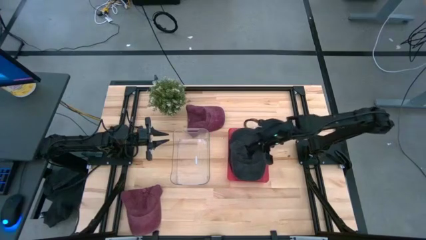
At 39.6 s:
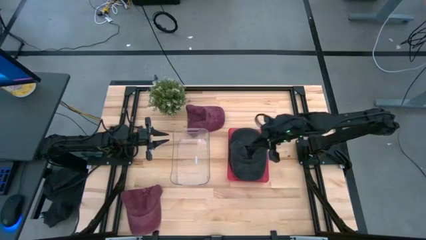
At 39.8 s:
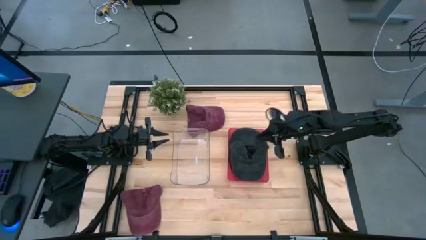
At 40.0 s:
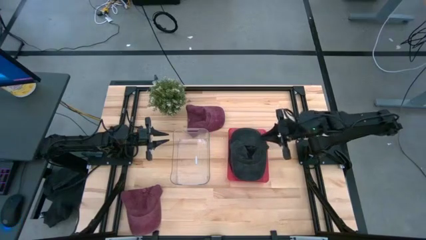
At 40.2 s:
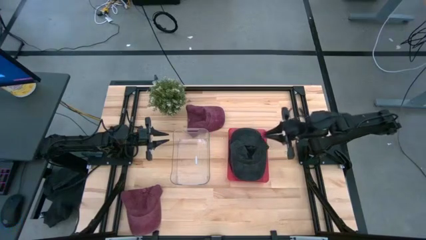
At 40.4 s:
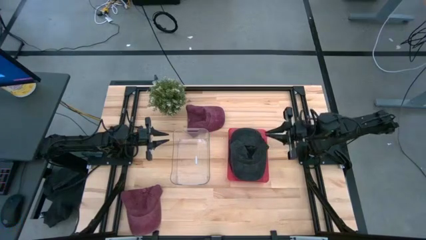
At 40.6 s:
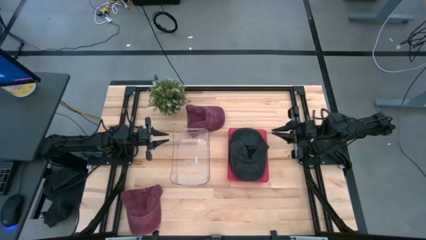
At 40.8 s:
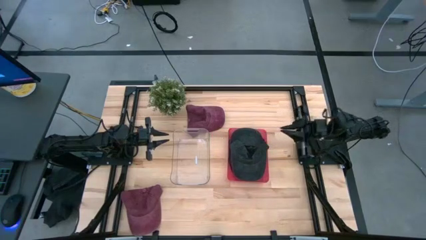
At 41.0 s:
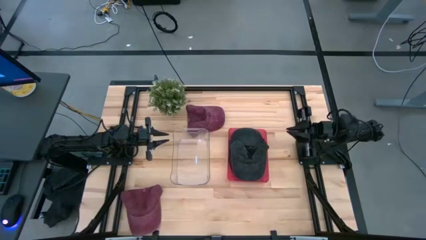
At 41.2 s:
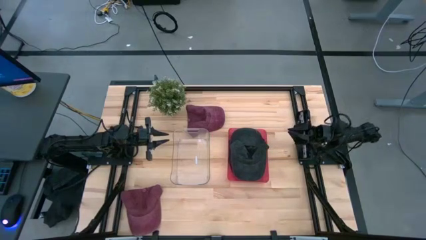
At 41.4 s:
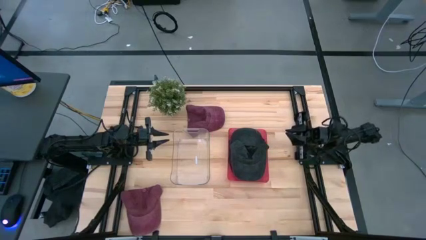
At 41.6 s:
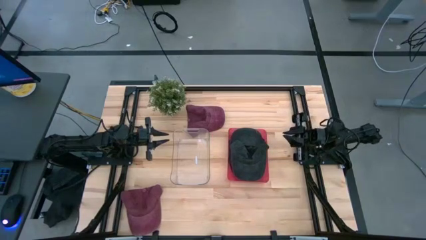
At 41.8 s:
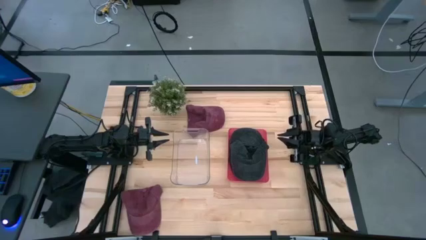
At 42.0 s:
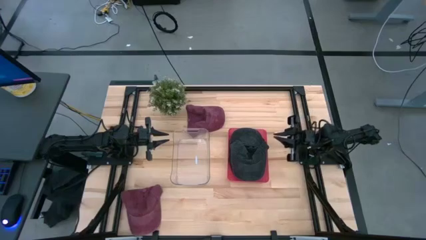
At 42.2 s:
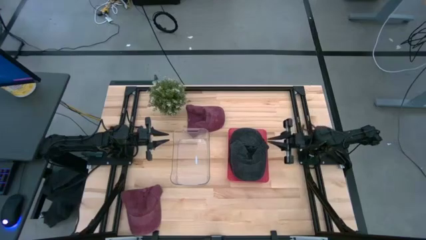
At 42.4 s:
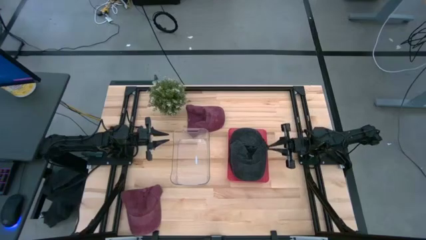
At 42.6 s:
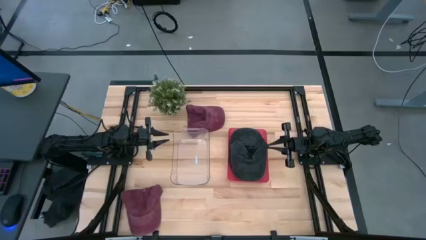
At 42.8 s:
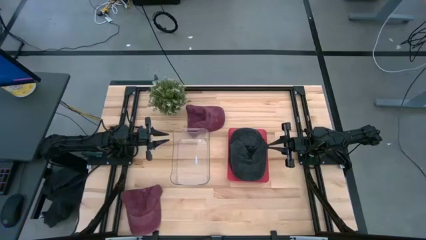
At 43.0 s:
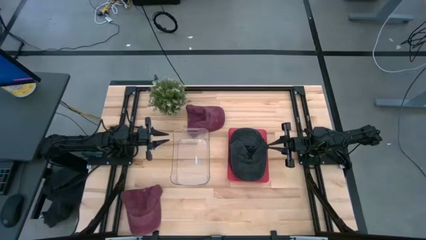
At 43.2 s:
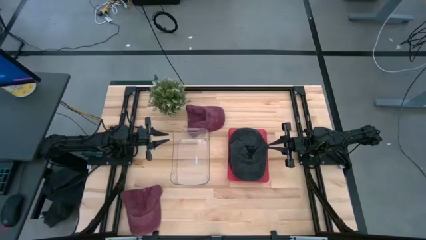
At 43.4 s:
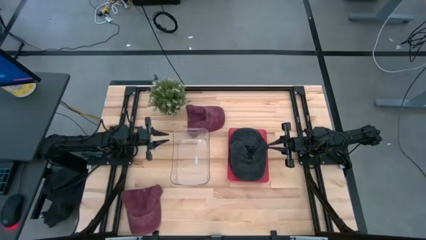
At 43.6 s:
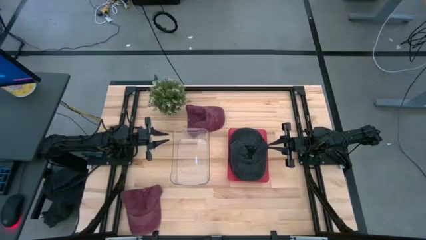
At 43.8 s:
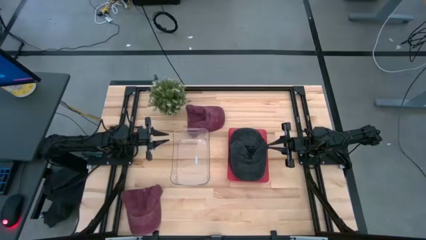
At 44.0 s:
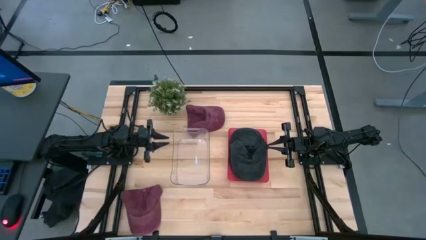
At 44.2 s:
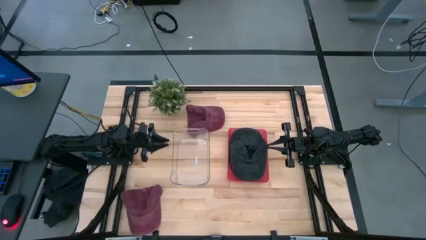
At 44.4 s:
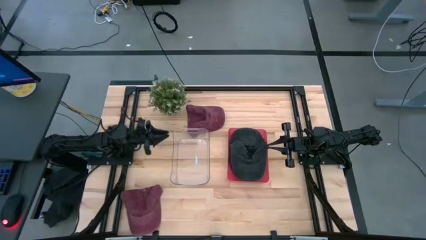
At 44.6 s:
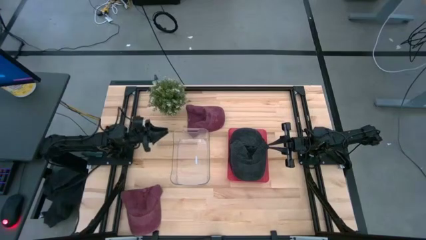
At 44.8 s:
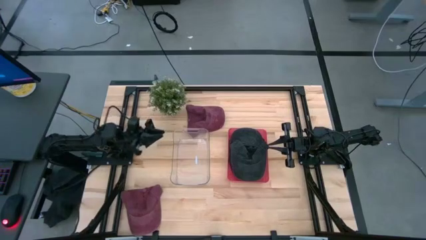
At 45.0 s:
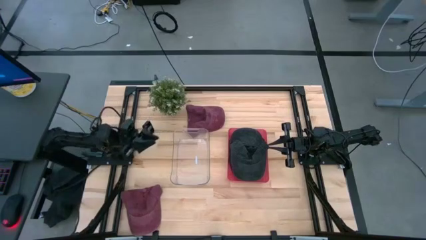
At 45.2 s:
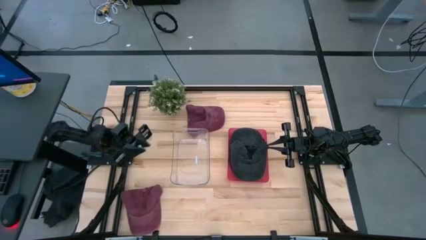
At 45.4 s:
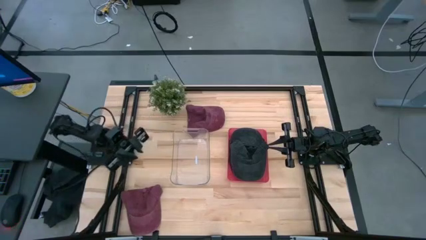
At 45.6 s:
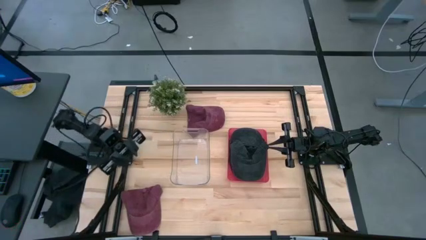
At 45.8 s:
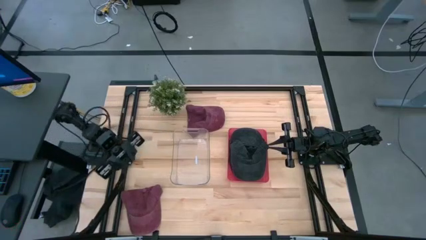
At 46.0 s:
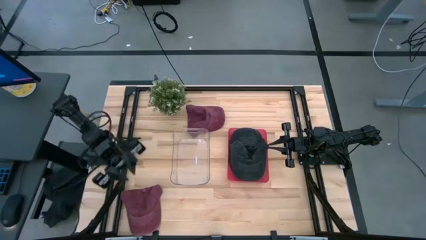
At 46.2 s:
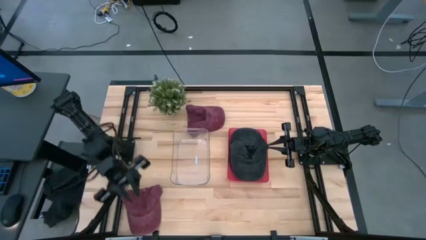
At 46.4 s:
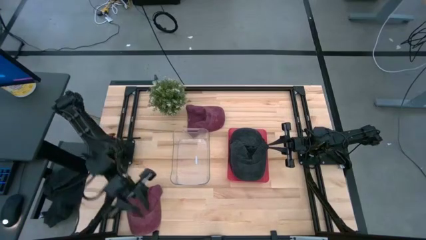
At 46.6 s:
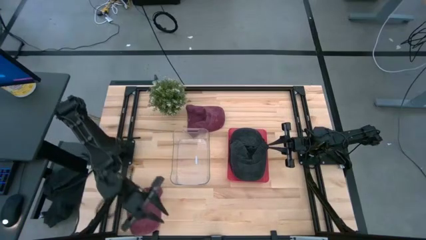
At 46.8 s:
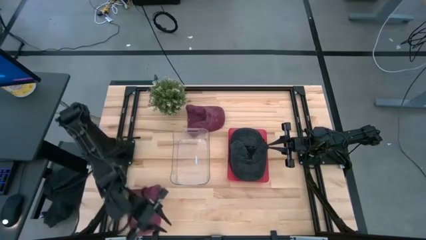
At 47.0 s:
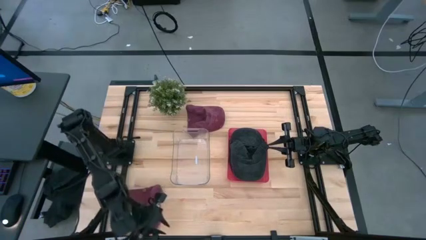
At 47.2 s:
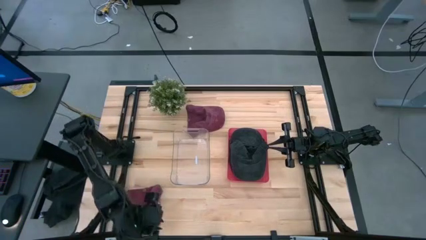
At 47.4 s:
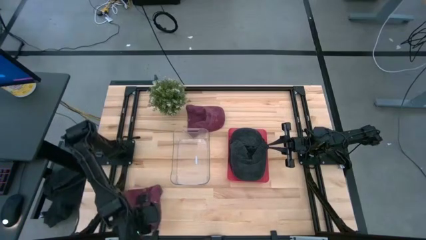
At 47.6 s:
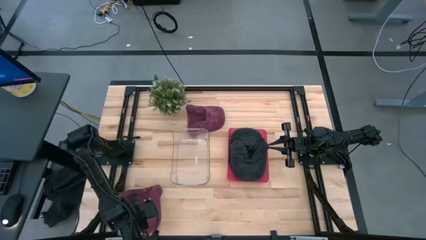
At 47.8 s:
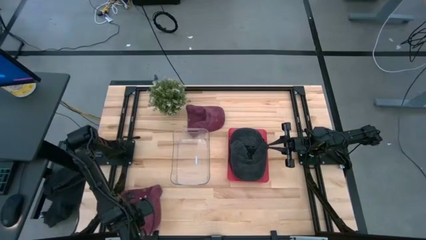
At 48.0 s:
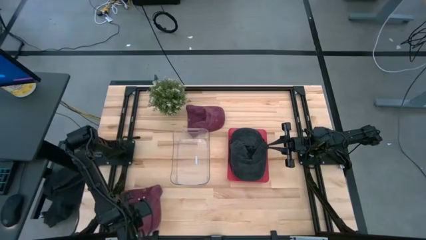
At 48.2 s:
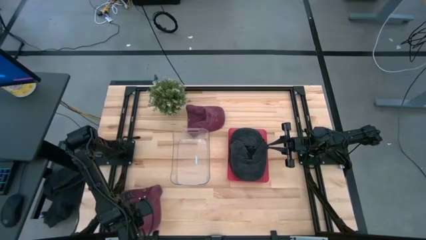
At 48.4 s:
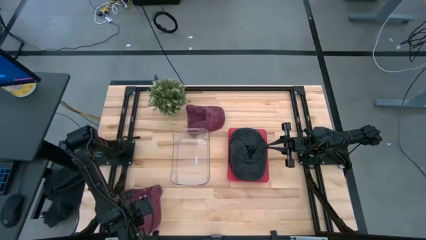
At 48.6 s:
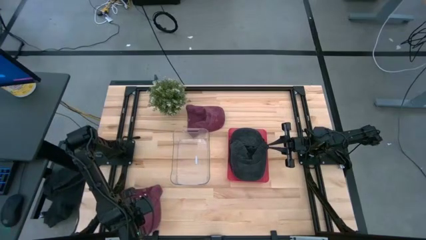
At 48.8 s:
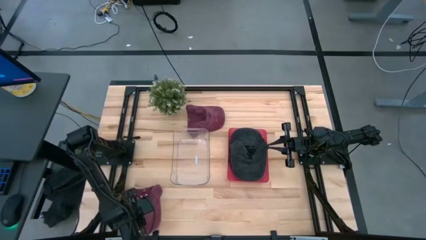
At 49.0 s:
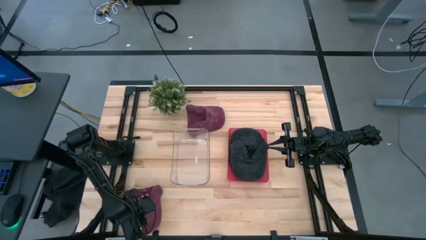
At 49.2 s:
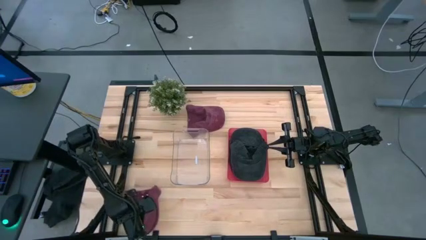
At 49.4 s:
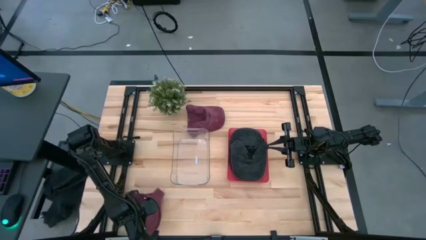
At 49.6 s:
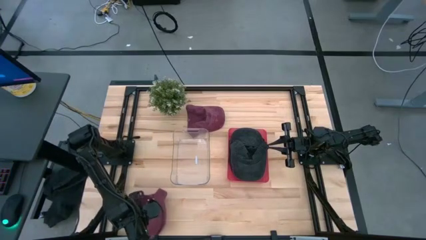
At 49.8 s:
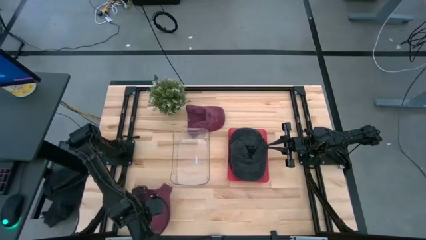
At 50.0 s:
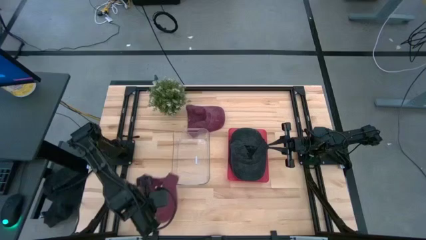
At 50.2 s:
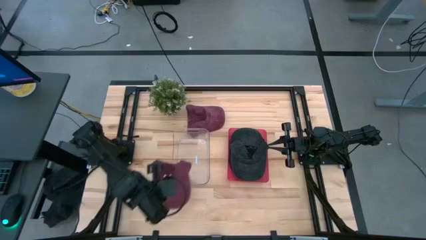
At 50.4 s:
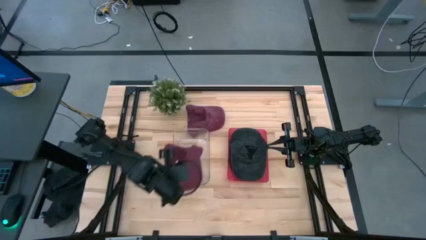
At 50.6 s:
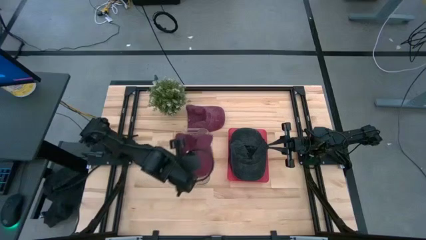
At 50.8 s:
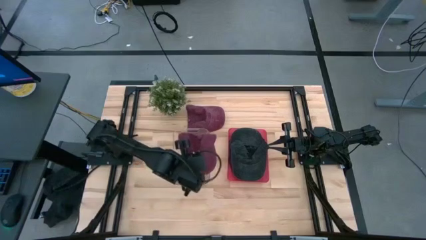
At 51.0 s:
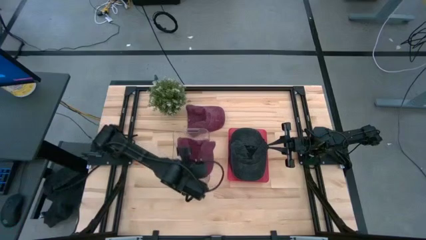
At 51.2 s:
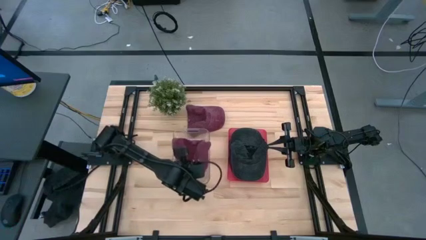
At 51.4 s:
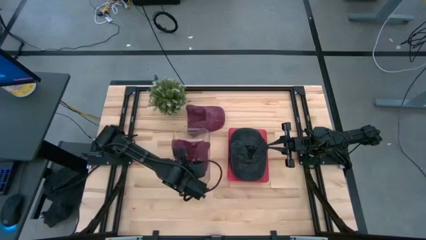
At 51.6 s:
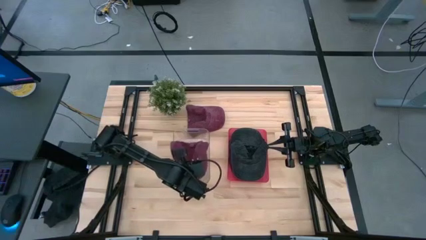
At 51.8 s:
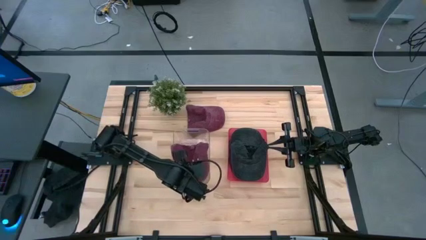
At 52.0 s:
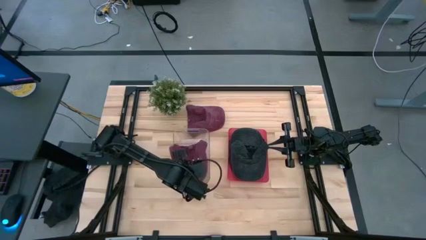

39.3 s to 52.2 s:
Task: Pick & Place hat
Put the bottom red cap into the transparent bin

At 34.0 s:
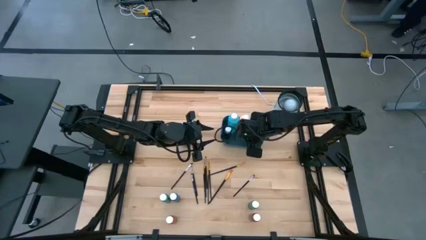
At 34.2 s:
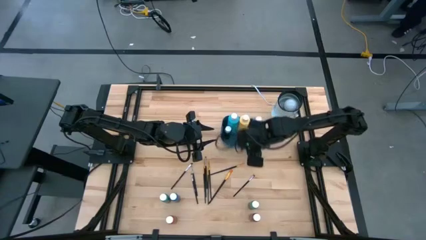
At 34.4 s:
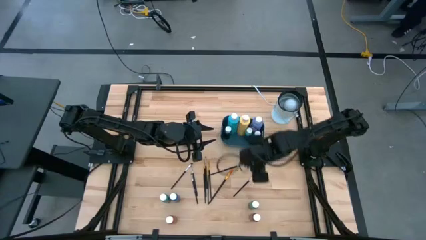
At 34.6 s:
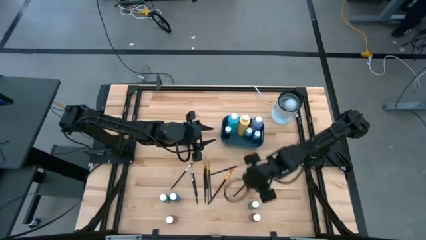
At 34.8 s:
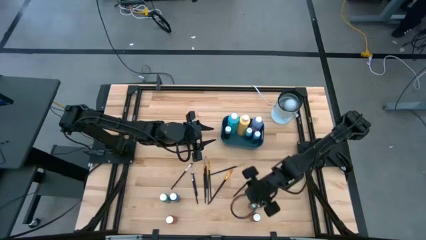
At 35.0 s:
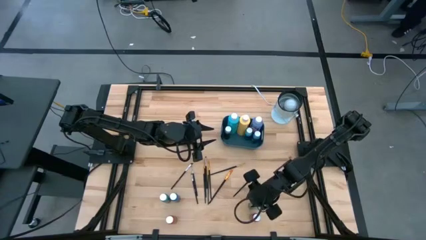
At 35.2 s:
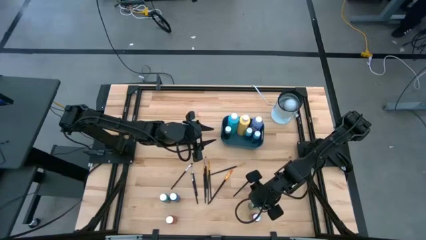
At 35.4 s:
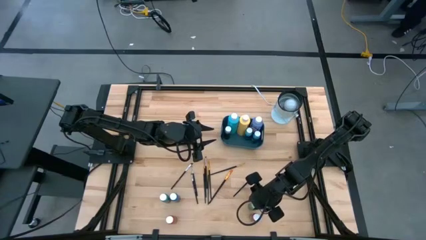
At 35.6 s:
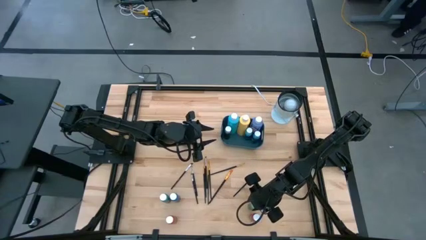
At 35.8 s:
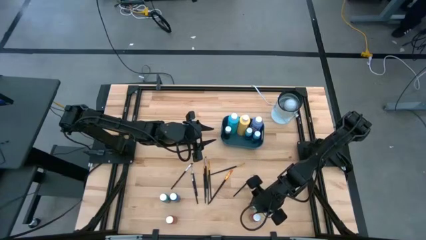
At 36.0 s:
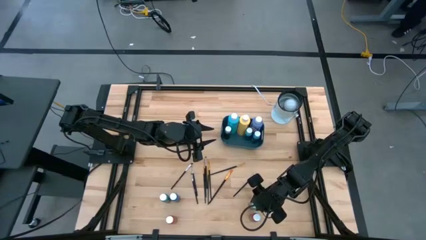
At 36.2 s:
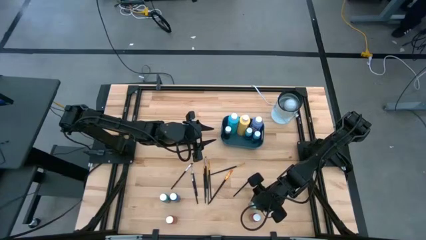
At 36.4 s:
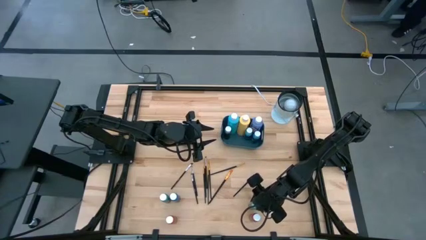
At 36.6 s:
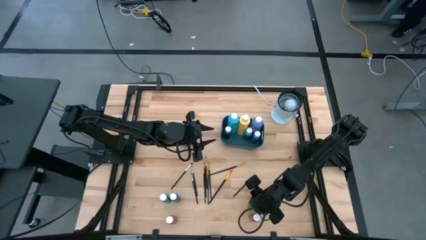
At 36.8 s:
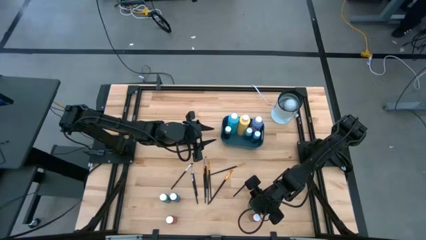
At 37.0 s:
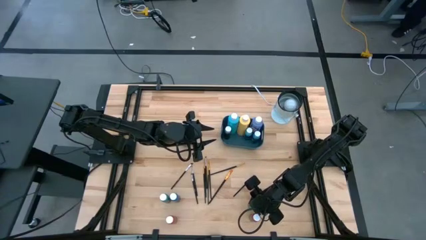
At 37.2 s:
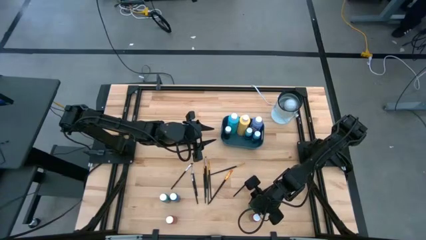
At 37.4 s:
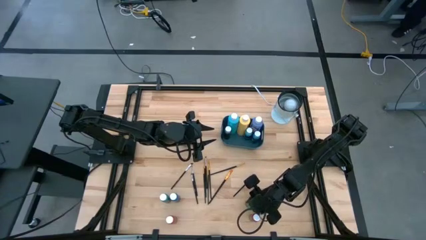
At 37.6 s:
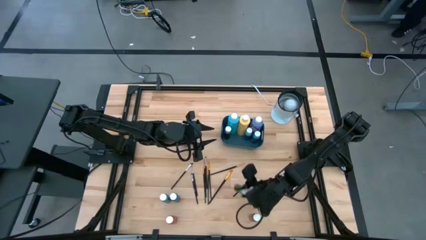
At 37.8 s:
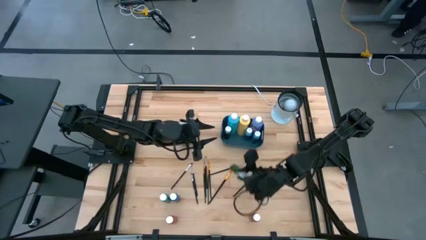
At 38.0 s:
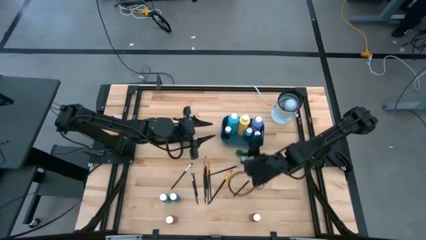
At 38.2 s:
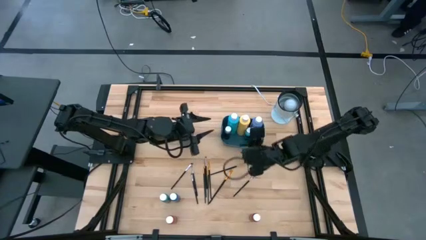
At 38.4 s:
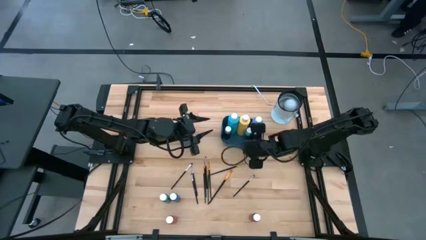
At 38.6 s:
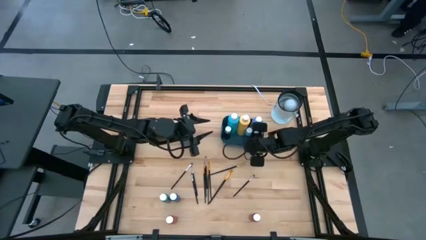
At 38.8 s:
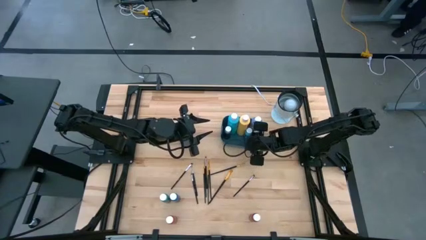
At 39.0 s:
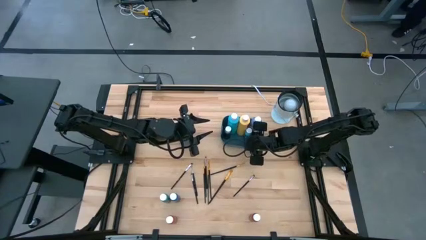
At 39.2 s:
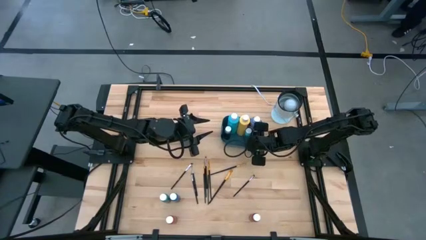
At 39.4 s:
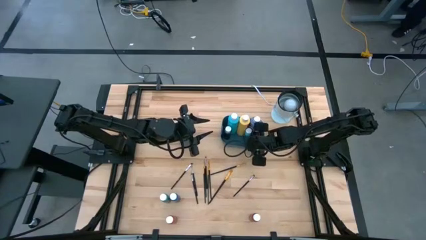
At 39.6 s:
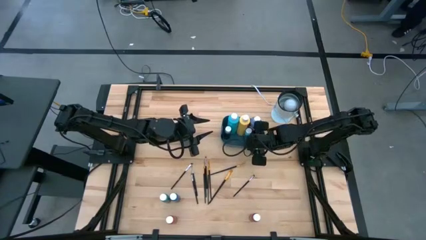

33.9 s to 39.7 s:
Task: Pick & Place Paint Supplies
Put the small green paint bottle into the blue bin
